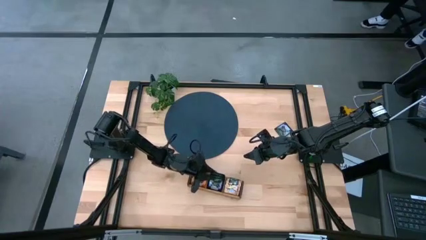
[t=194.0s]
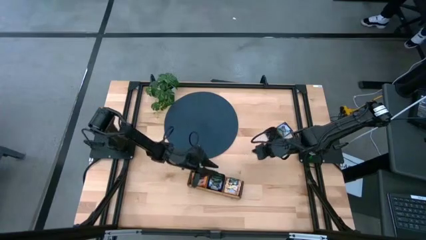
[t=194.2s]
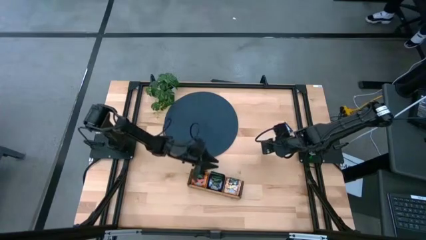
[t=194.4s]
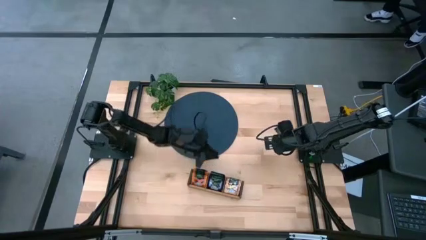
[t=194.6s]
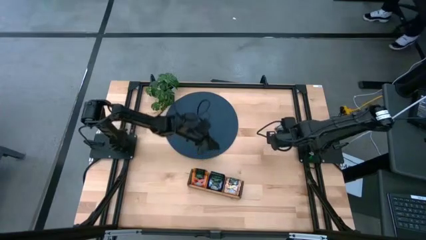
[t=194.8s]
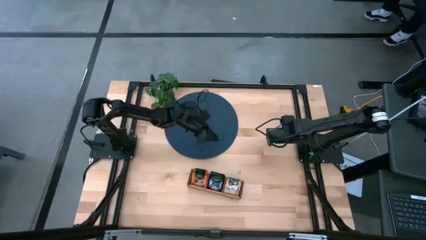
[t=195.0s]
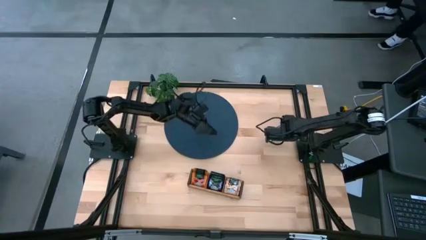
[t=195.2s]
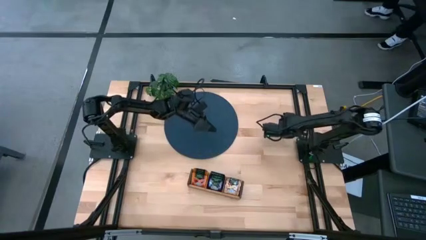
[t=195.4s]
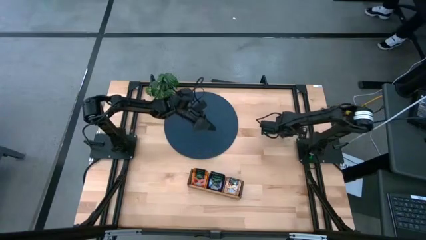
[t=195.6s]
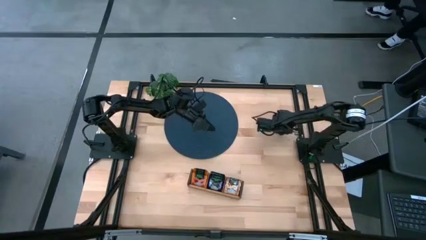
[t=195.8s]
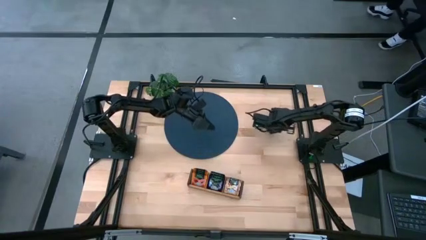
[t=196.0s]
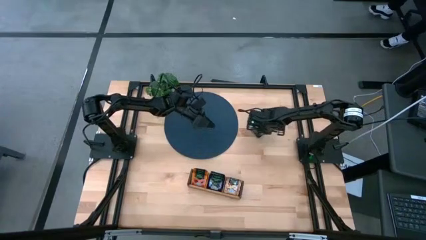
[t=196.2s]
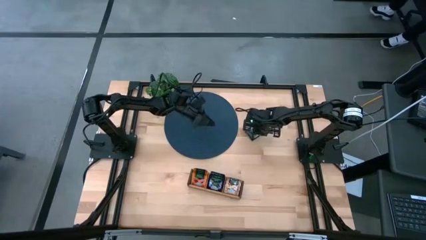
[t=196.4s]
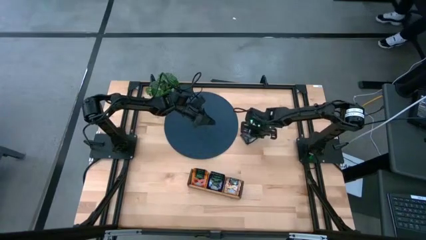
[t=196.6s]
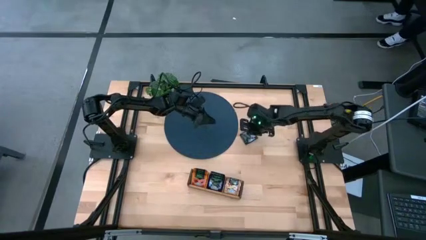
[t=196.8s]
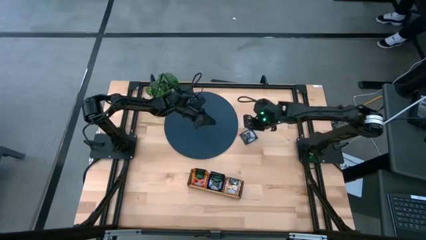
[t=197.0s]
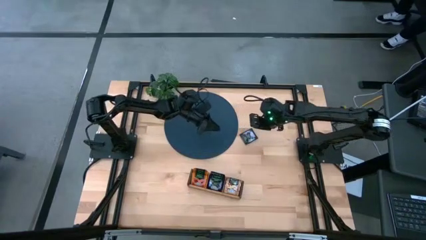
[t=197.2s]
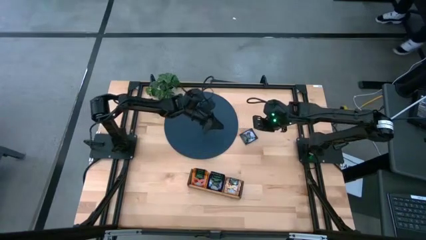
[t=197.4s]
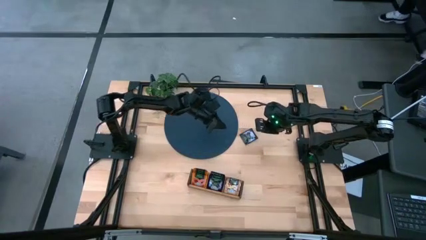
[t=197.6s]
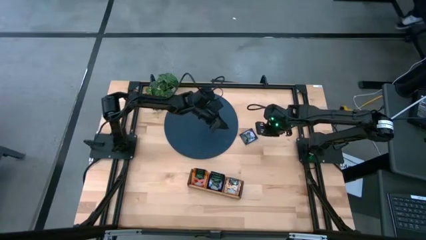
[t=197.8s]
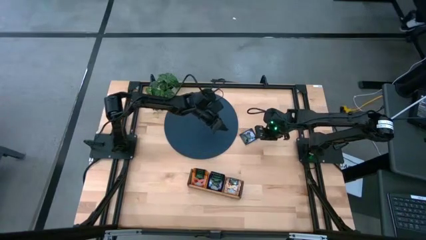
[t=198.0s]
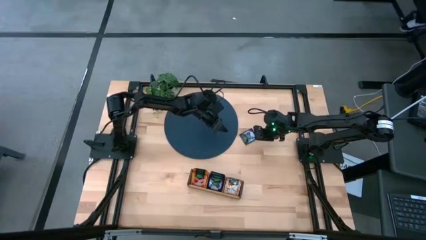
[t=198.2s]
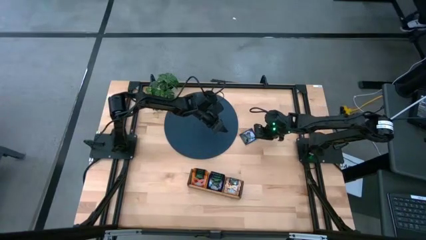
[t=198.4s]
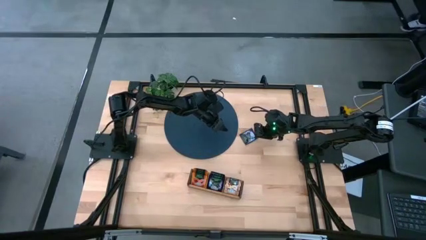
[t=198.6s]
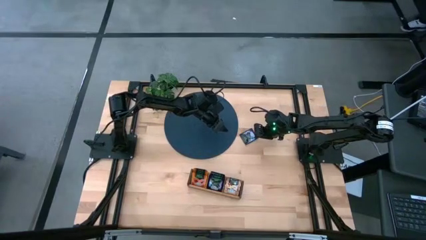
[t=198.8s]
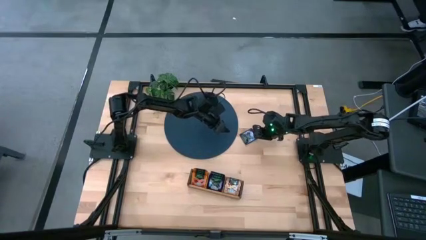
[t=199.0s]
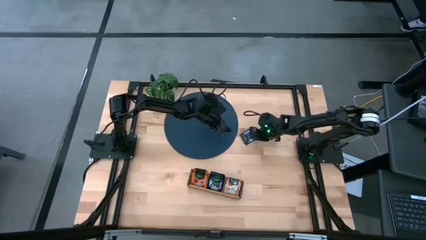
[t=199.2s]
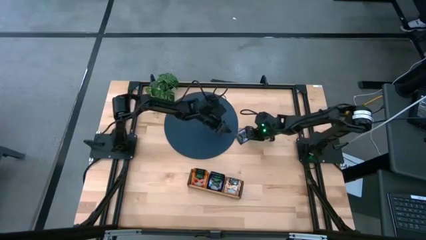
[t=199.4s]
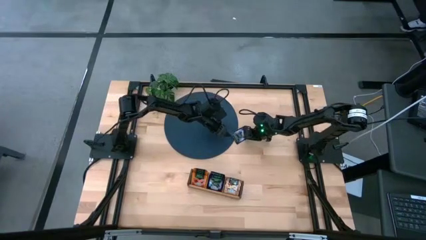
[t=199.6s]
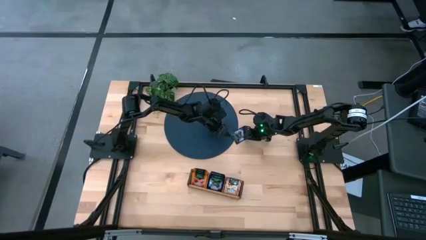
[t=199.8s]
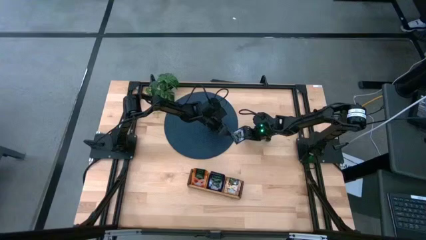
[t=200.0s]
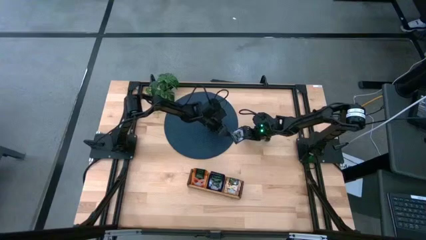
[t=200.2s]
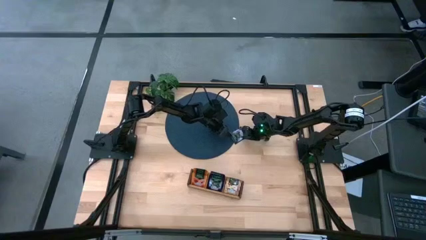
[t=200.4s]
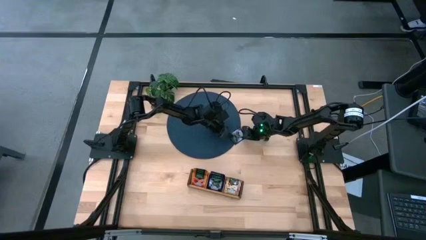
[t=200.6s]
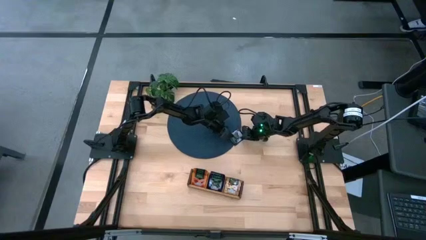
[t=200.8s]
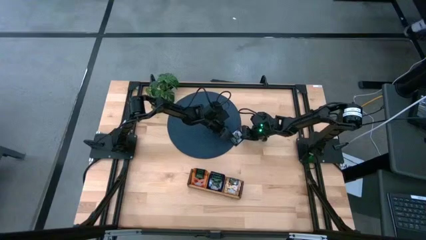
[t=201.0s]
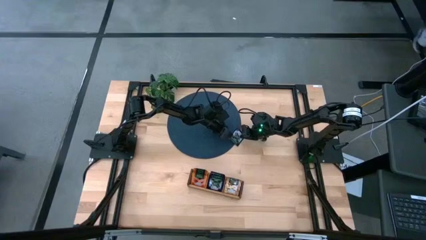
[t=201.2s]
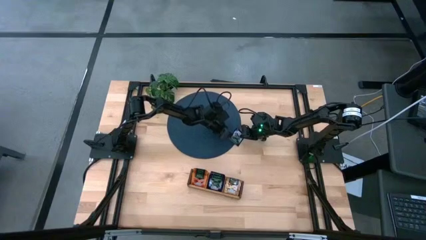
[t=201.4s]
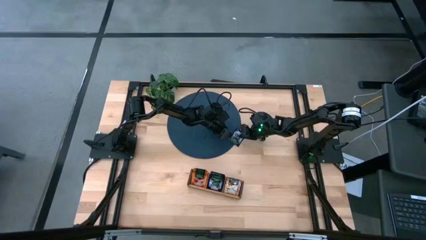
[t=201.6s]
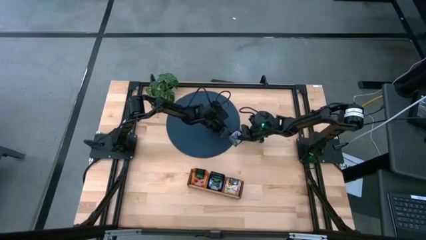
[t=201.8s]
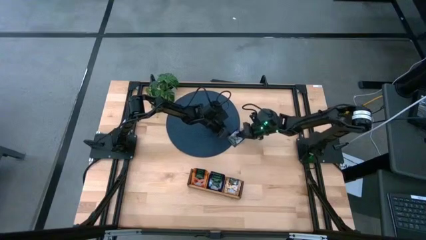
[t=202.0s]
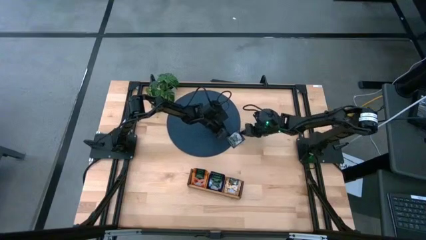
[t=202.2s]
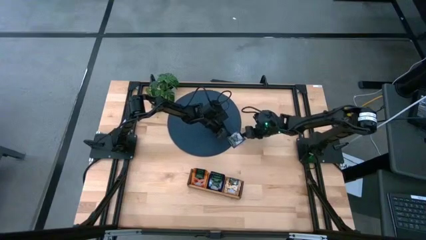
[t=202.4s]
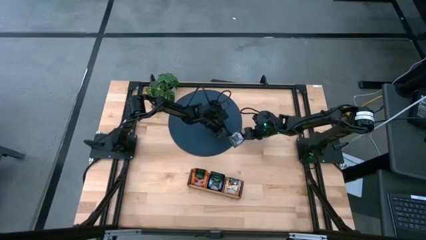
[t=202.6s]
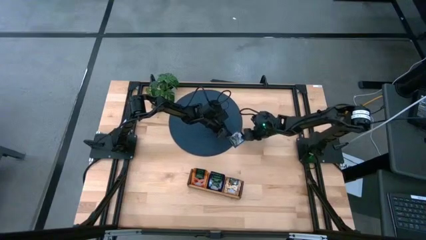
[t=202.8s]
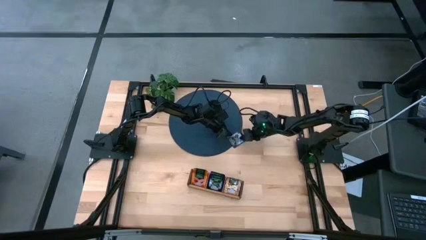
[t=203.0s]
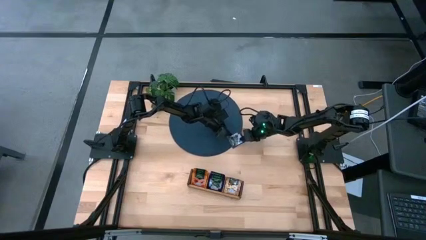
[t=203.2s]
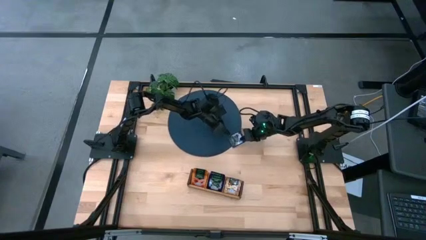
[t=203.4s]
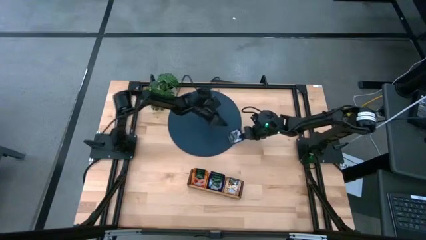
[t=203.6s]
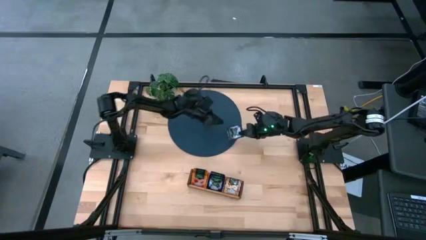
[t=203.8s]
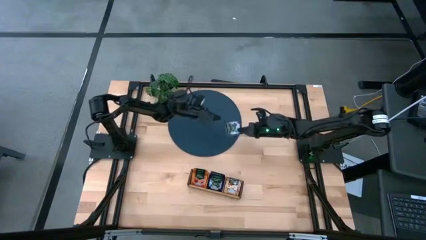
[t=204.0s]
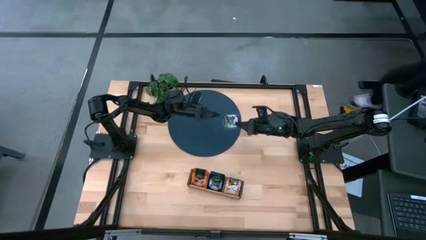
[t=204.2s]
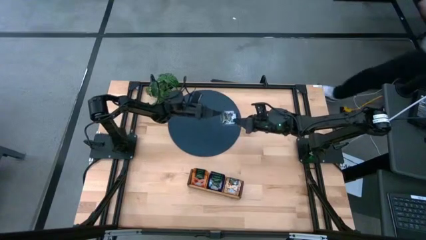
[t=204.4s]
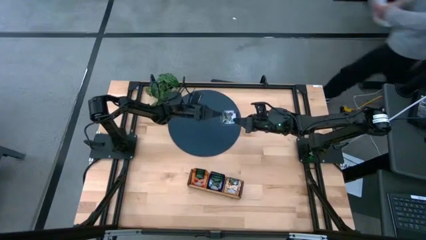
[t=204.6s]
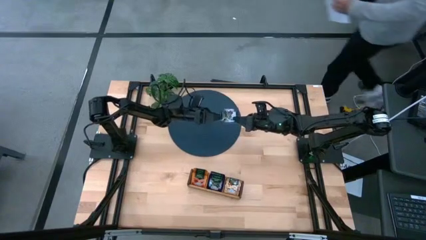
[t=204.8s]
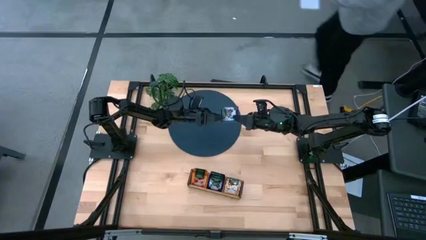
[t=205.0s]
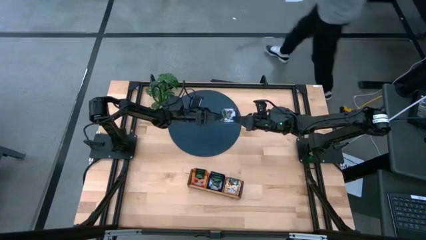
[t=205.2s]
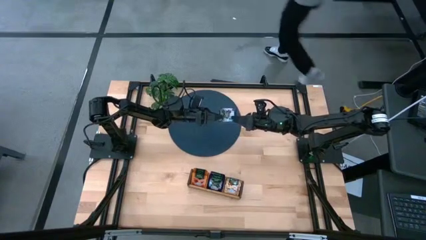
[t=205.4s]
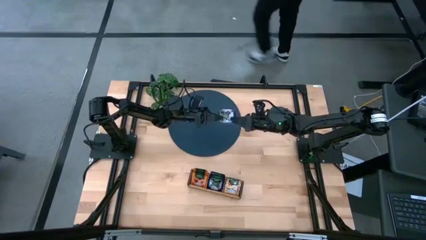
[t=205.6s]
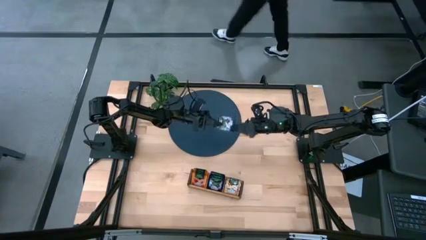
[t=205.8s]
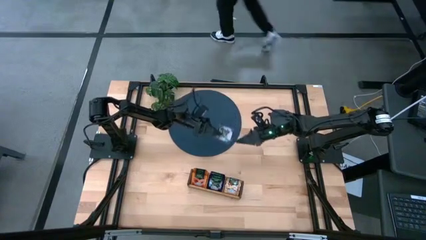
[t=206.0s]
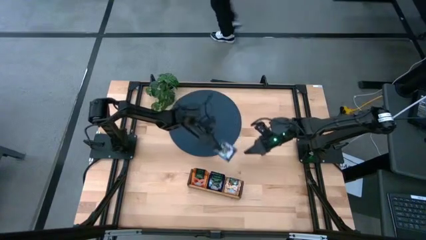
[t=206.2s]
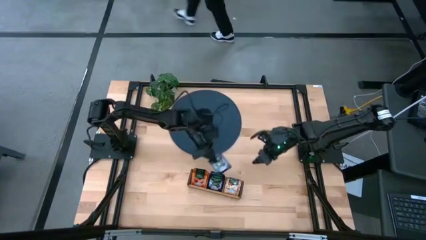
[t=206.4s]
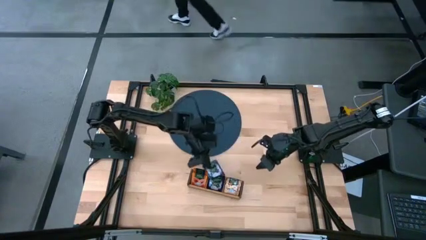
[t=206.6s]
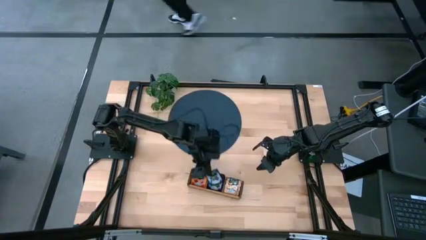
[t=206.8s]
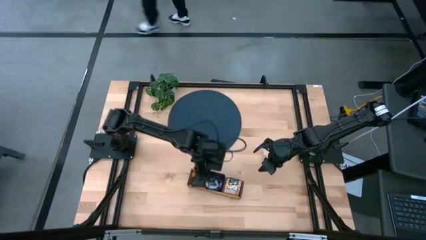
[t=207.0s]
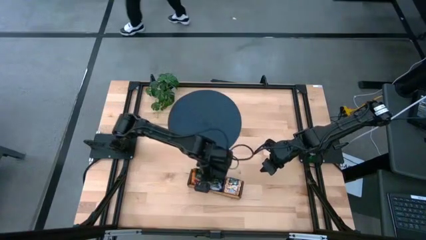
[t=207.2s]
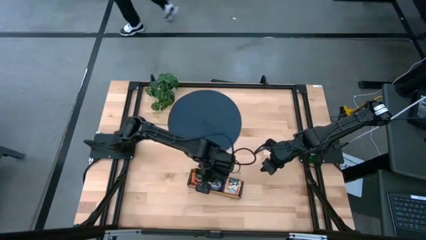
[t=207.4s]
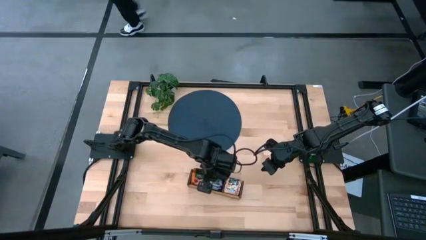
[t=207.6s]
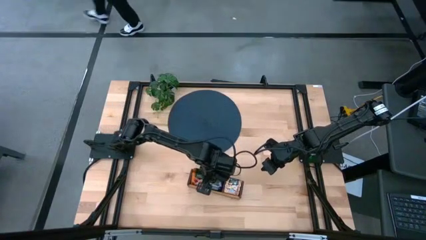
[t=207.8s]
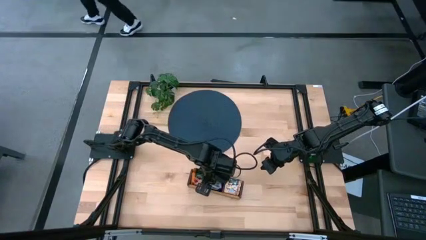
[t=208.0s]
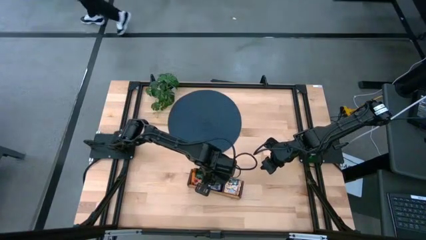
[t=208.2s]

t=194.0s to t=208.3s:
Task: Pick & Place Tea
Put the violet tea bag into the middle section of the wooden organizer
